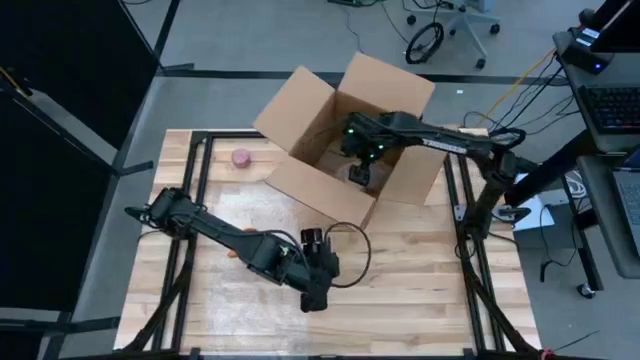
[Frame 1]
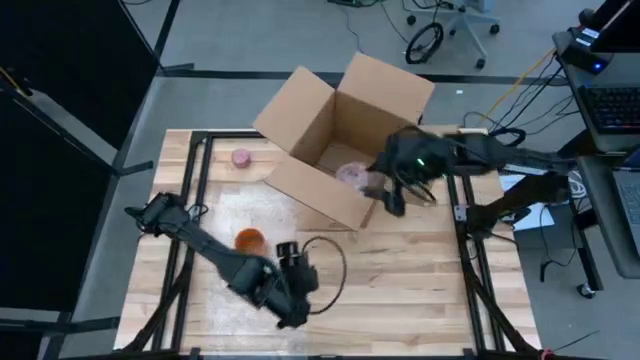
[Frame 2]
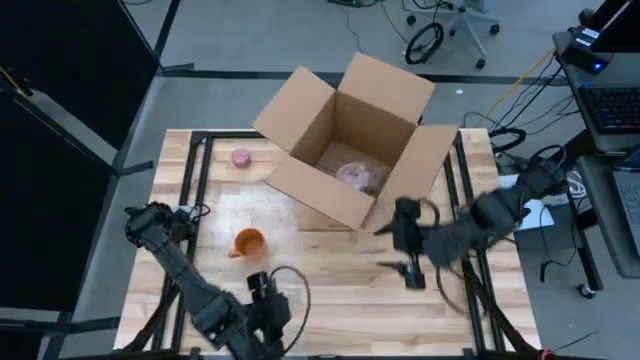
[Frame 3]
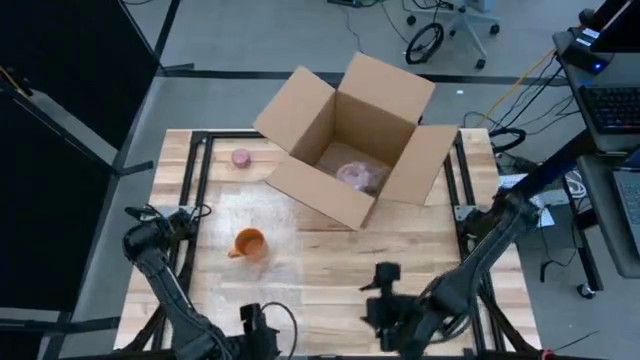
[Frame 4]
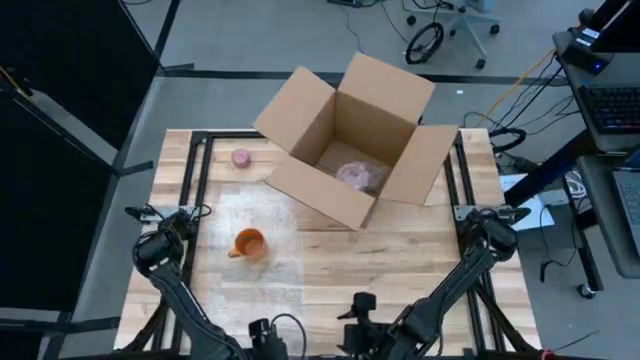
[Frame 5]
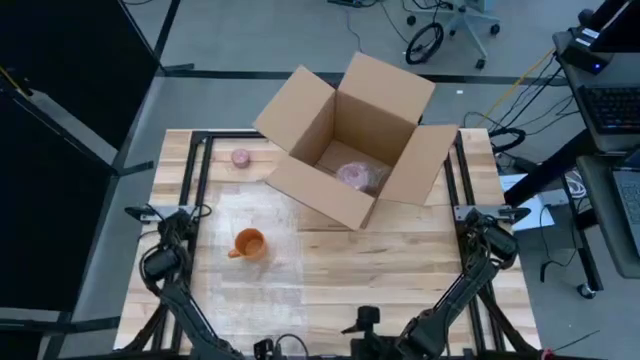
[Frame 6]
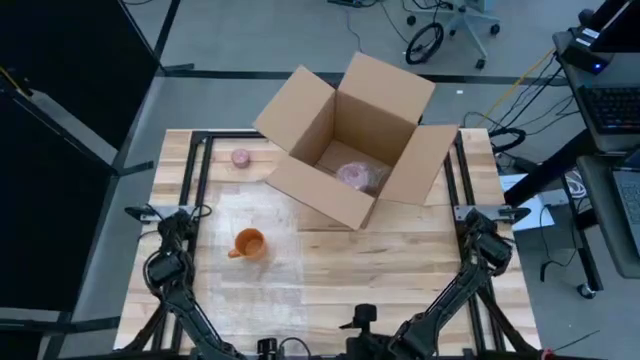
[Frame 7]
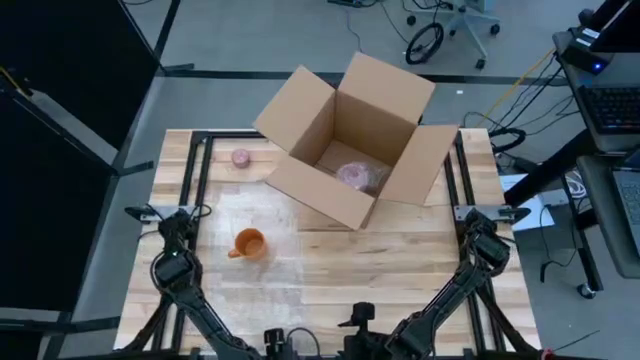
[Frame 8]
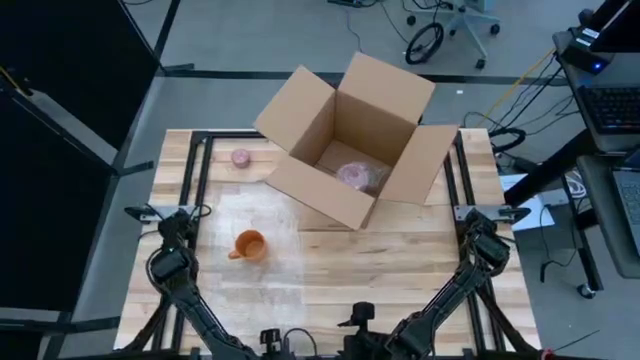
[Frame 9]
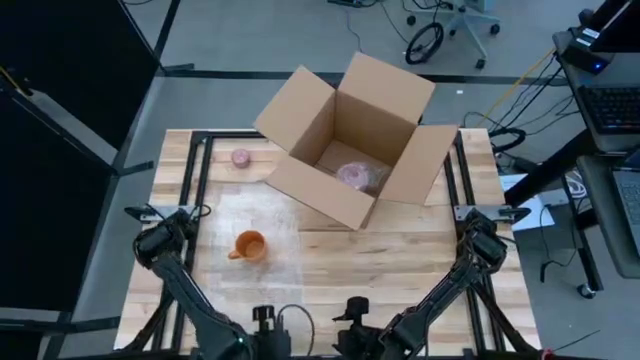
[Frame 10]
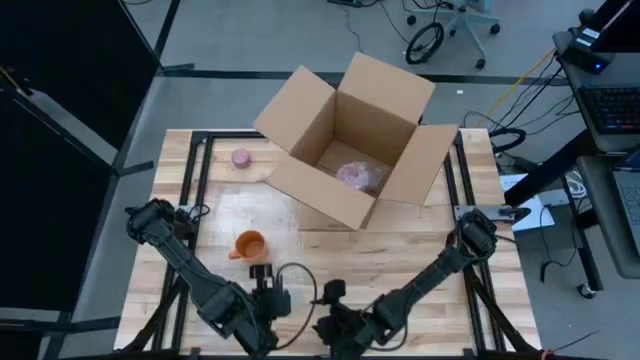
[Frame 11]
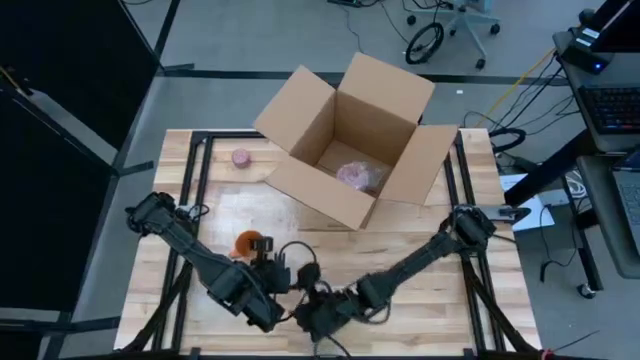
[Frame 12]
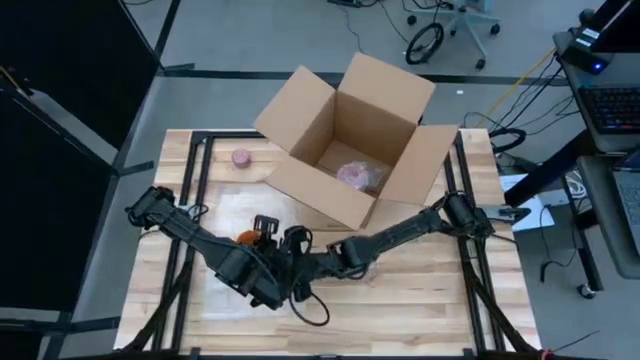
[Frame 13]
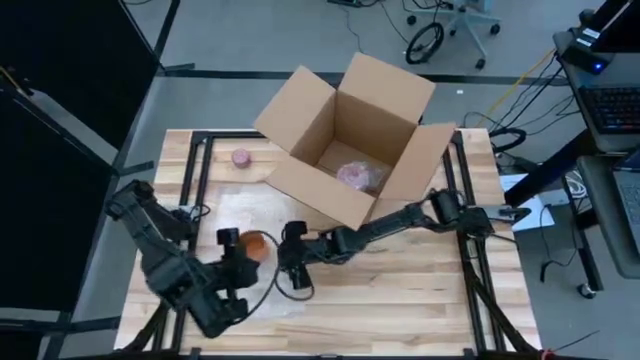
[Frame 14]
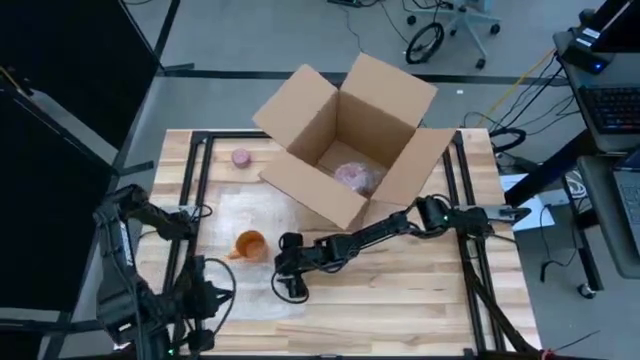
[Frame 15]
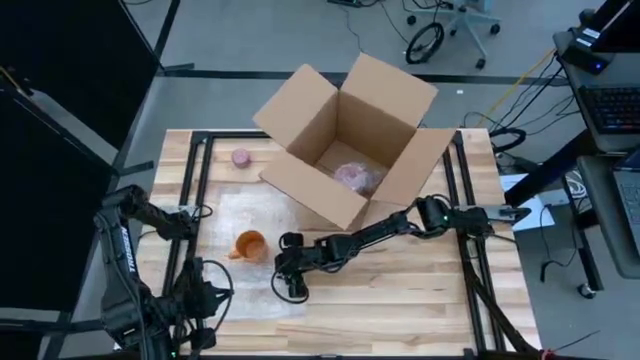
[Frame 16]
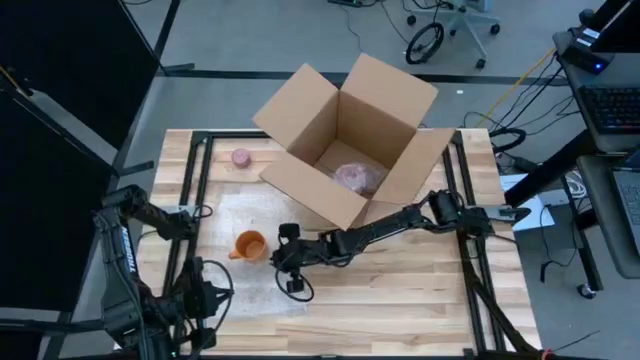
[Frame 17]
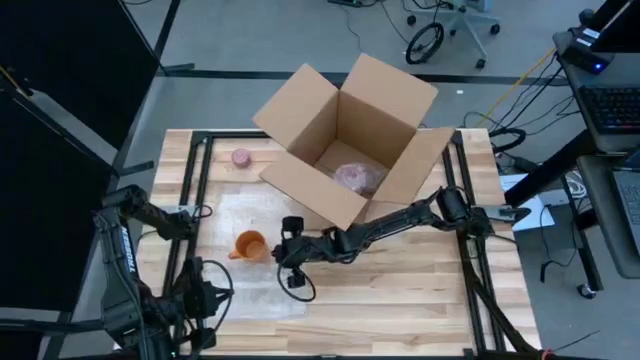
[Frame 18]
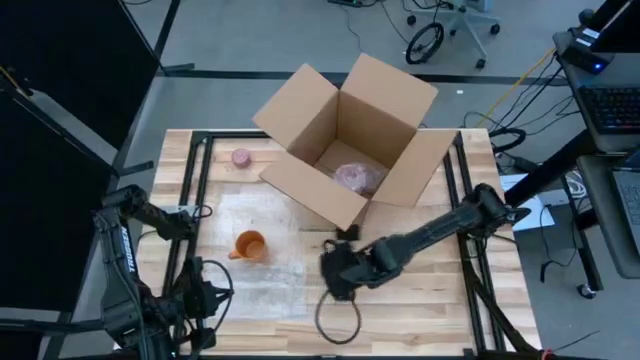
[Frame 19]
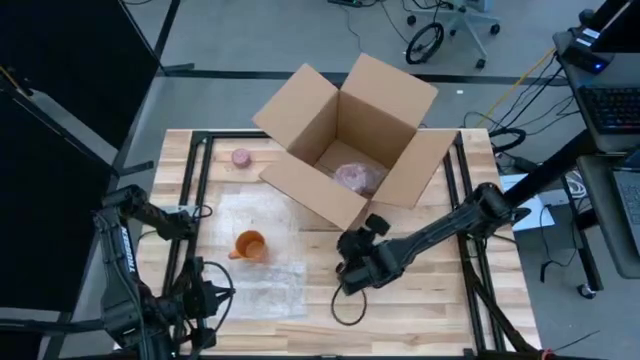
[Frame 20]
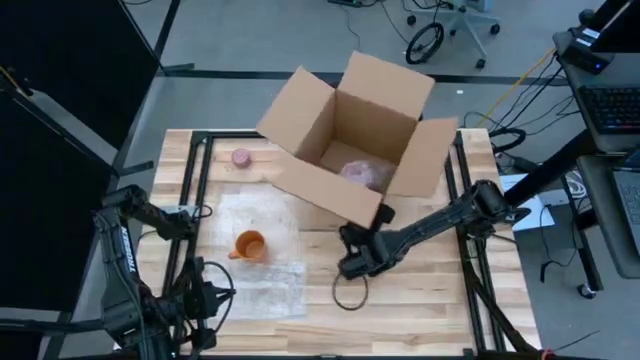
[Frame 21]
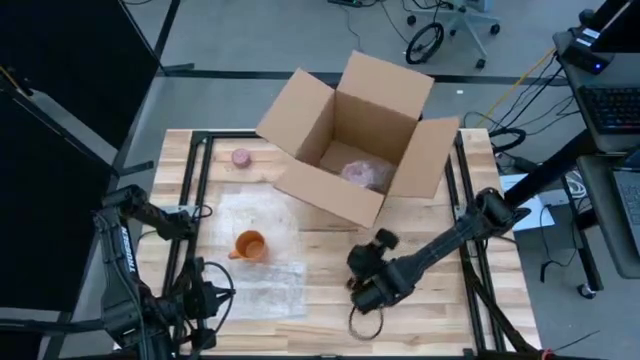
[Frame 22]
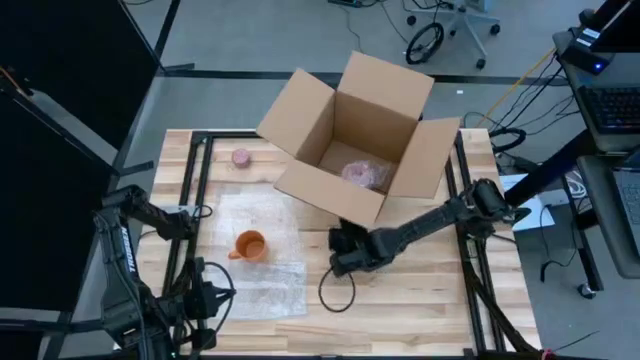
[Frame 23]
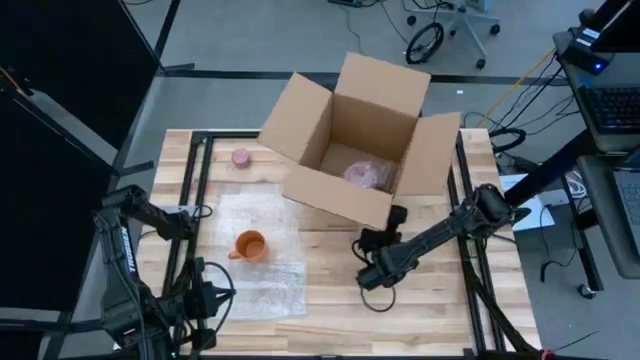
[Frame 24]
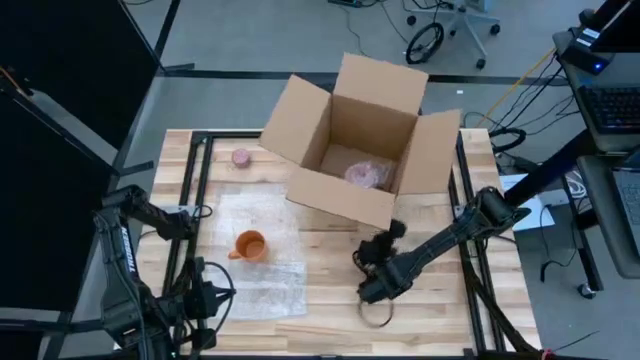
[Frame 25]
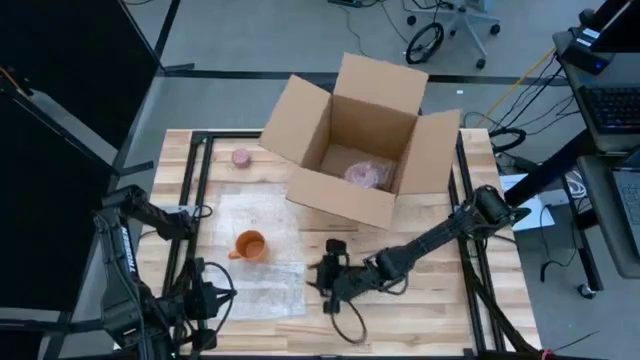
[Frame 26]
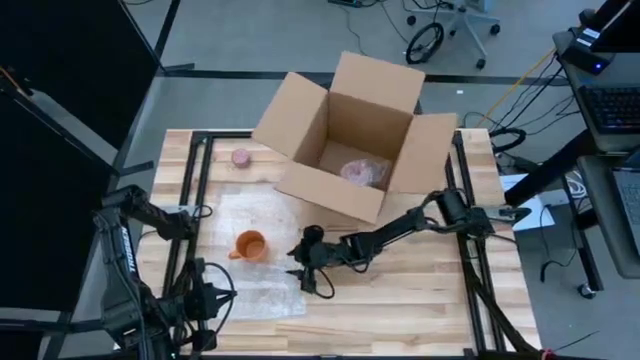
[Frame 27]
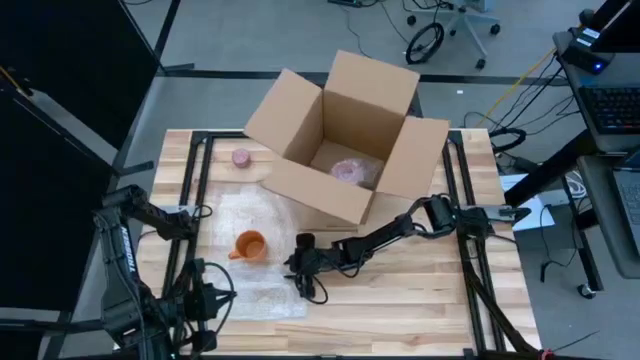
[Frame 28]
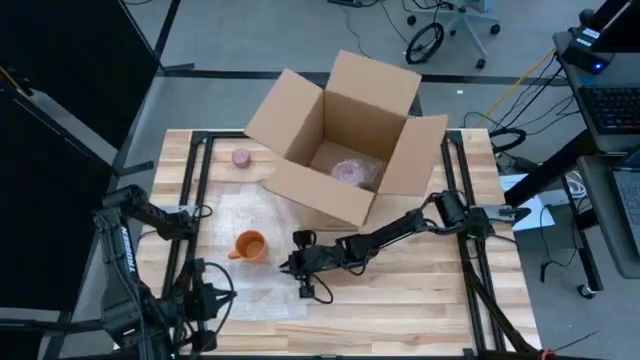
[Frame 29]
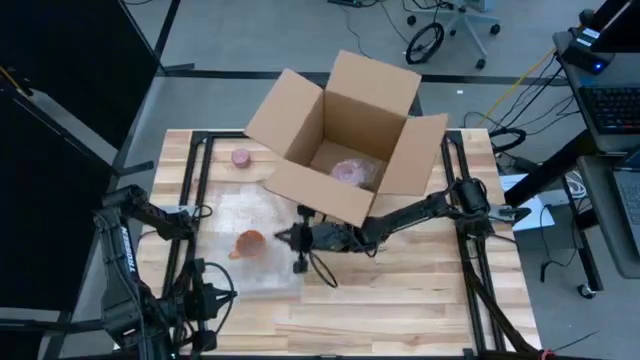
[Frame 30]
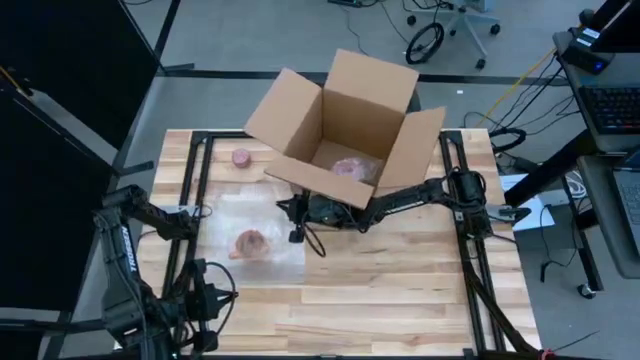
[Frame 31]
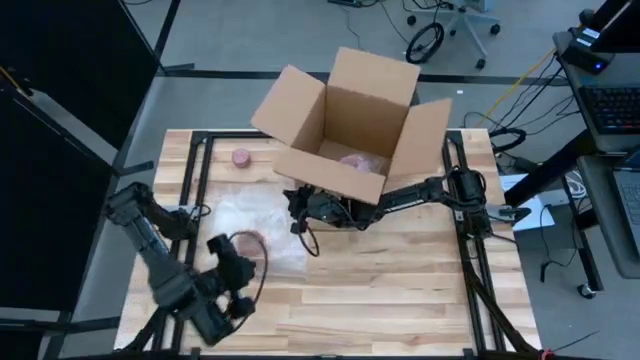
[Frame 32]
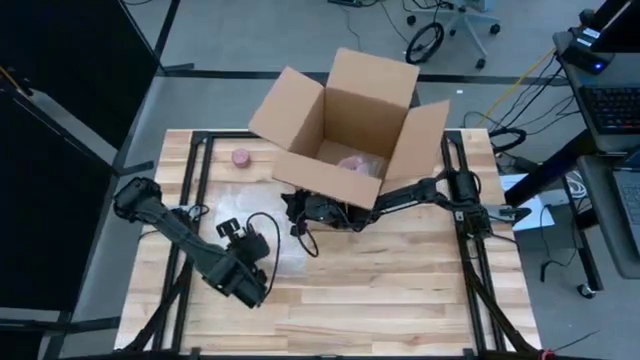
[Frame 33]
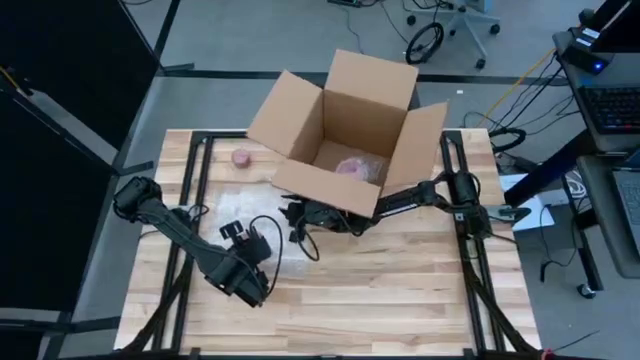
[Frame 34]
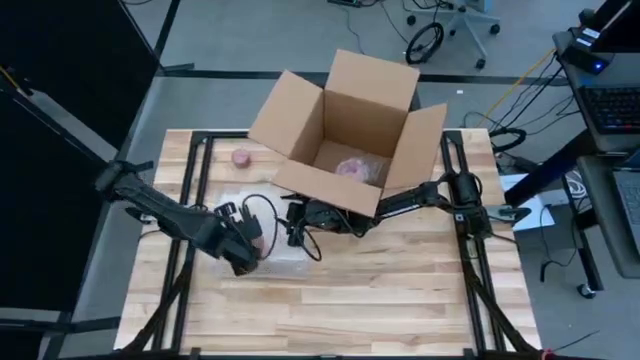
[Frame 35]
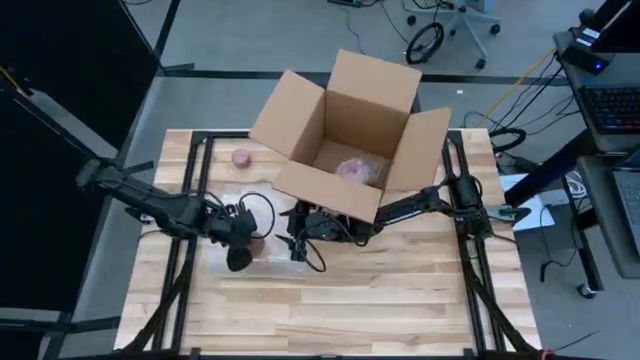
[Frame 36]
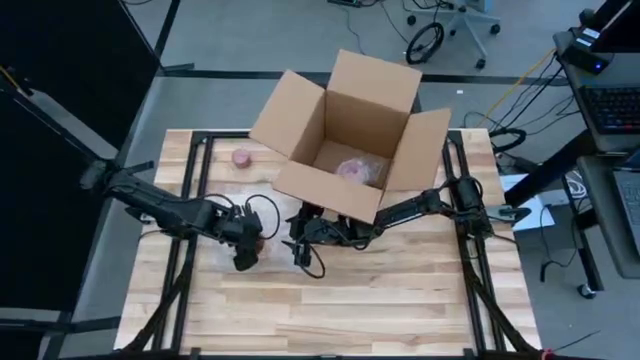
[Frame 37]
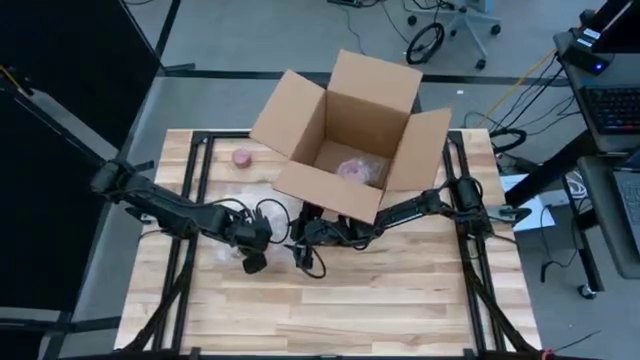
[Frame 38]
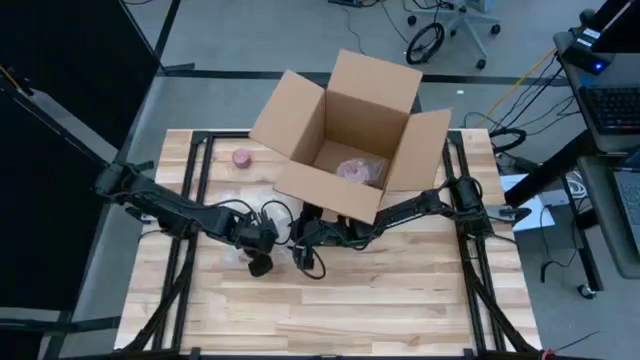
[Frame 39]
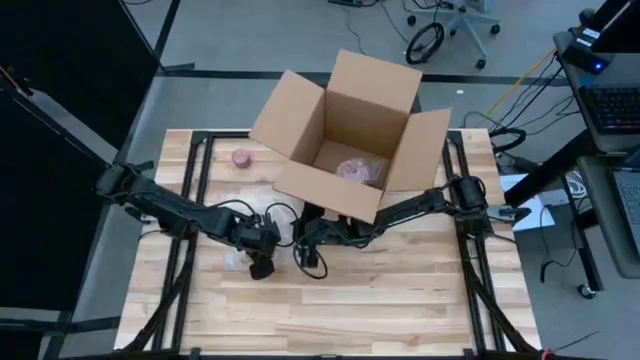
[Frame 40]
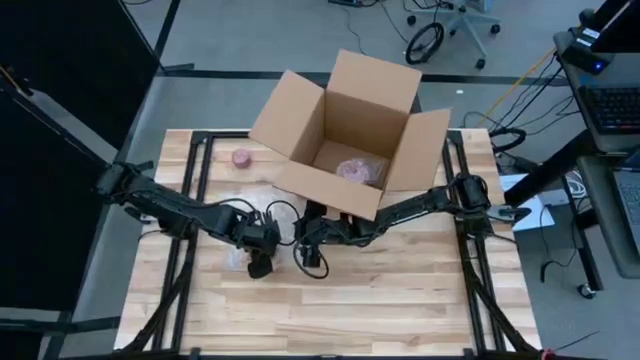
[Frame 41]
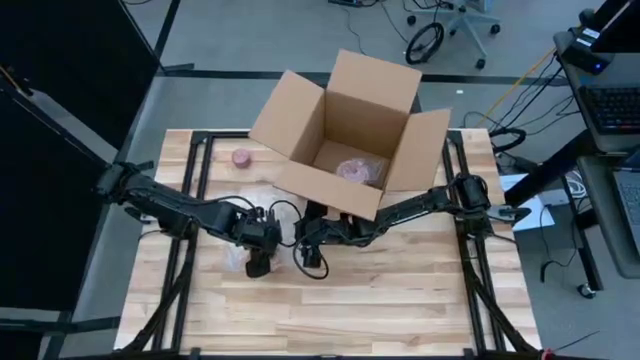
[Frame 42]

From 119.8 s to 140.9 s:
Task: wrap mug
Wrap the yellow mug in the bubble wrap
